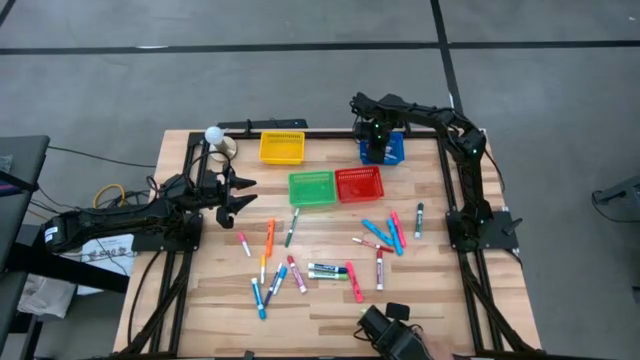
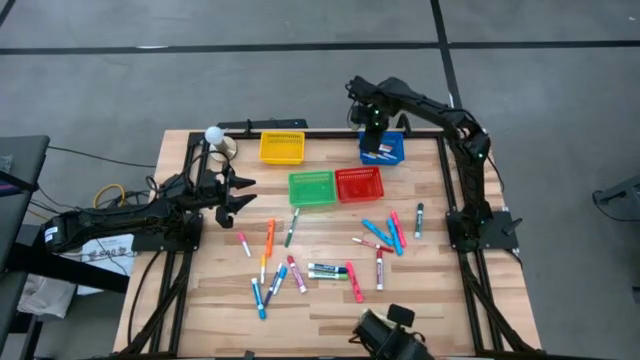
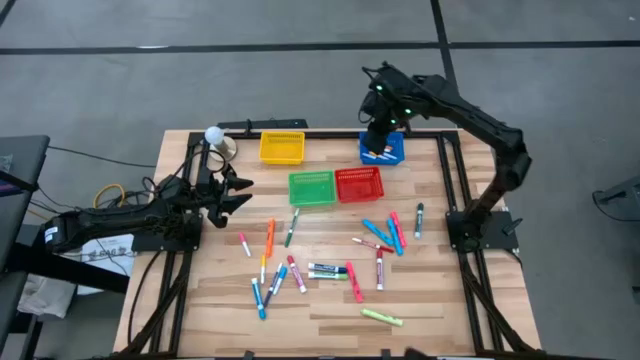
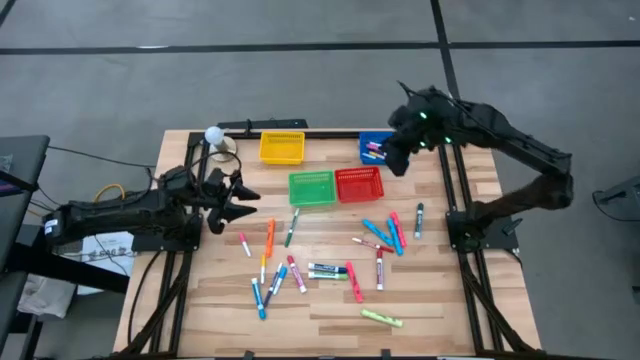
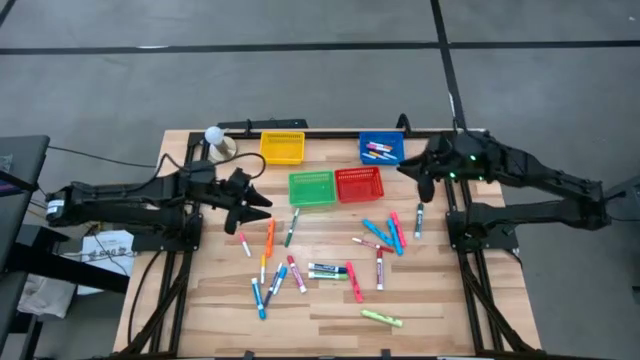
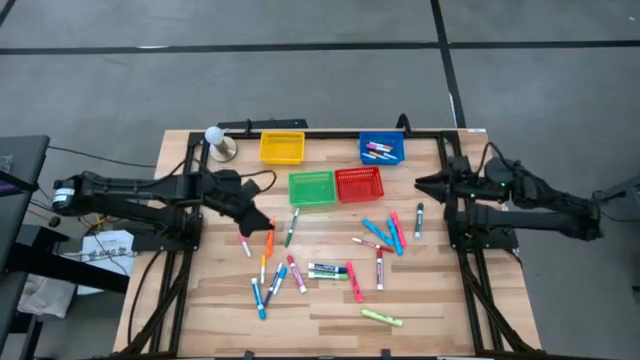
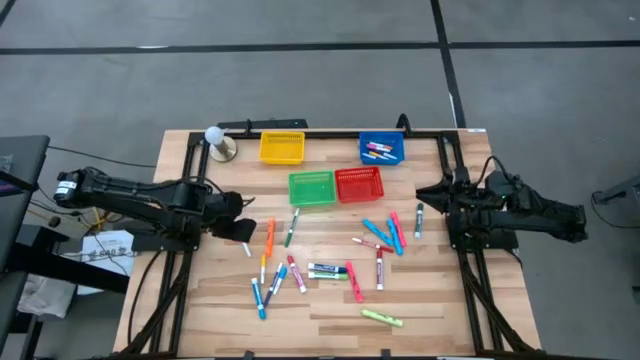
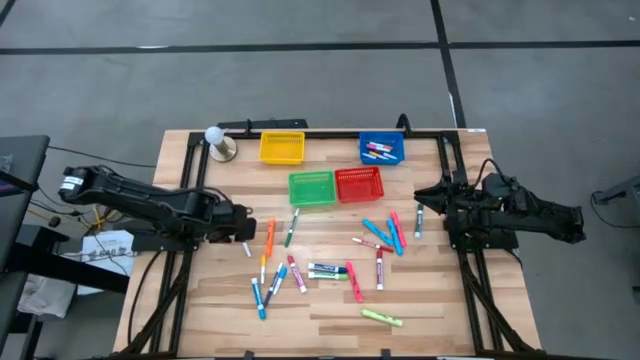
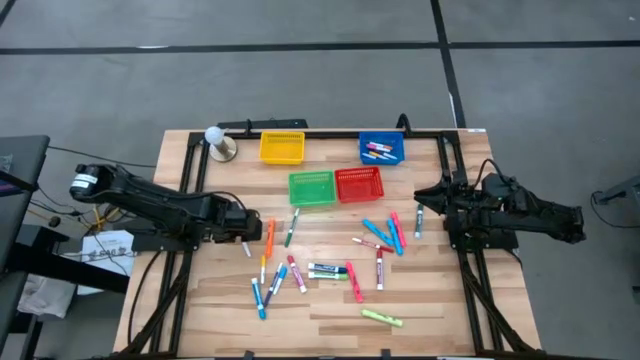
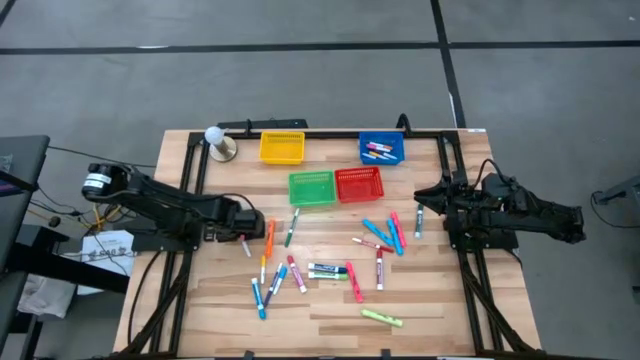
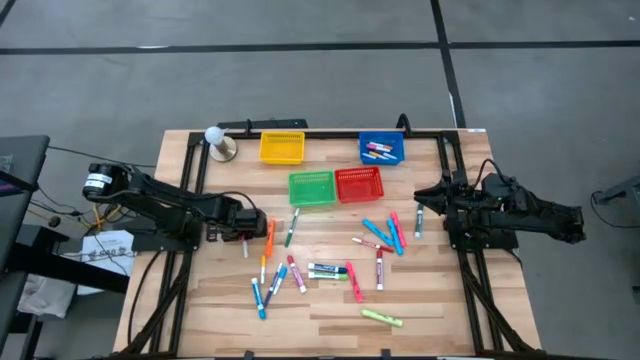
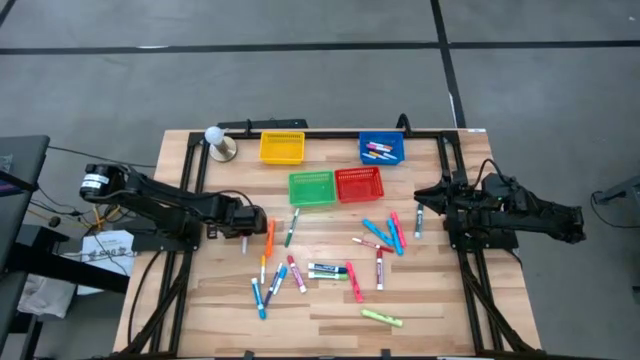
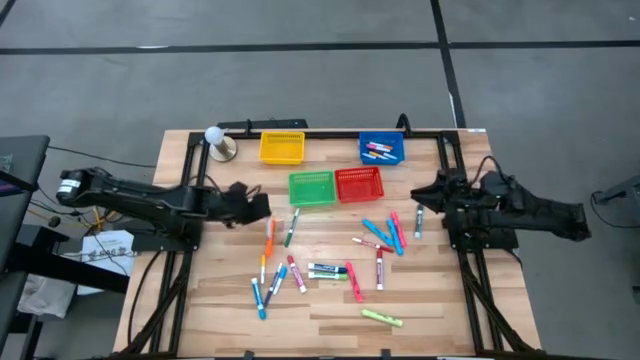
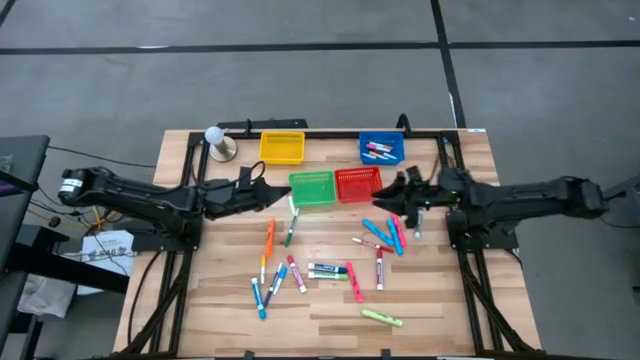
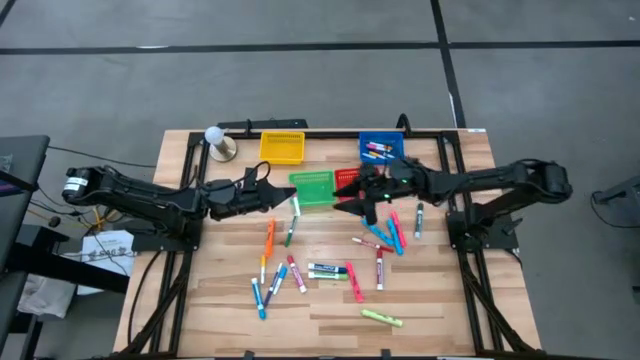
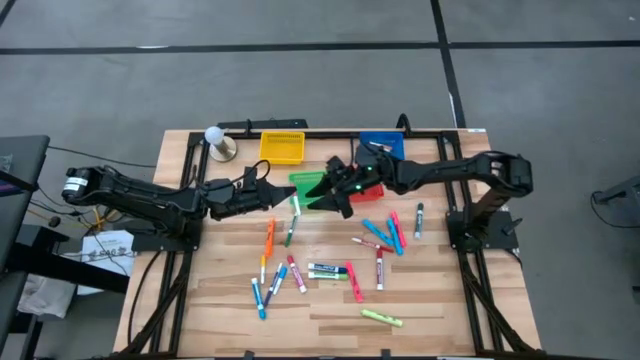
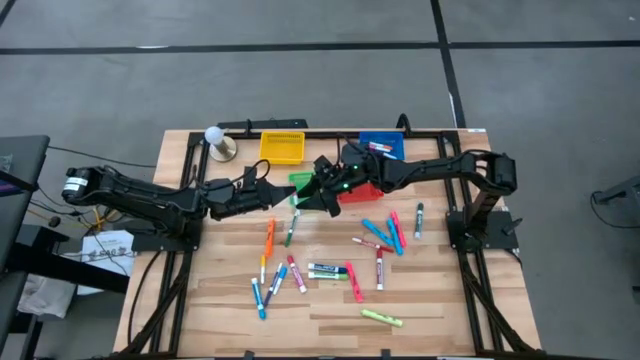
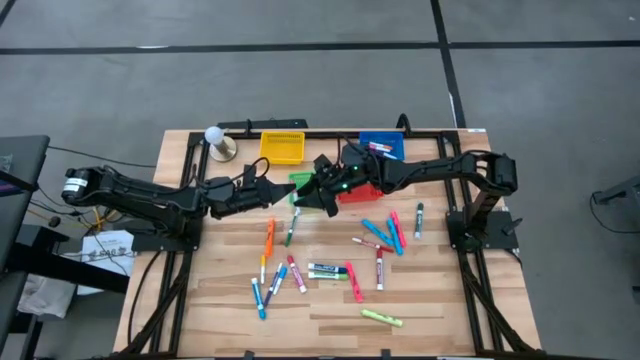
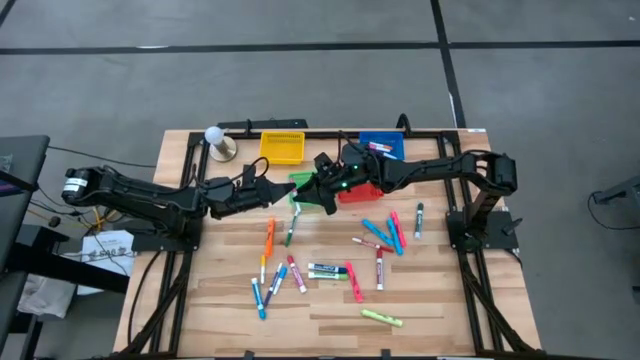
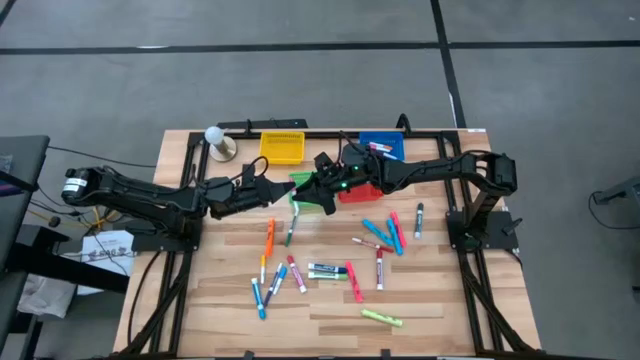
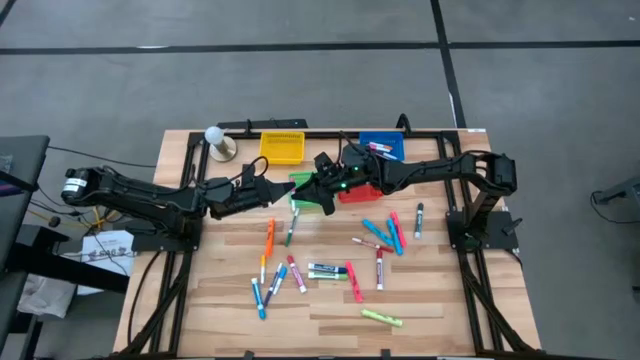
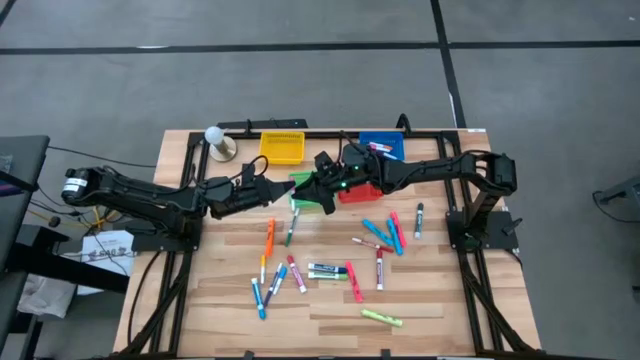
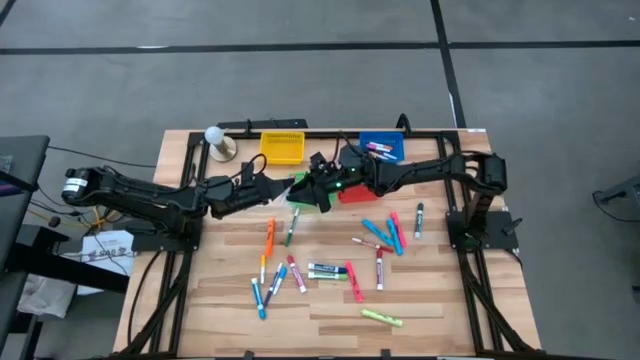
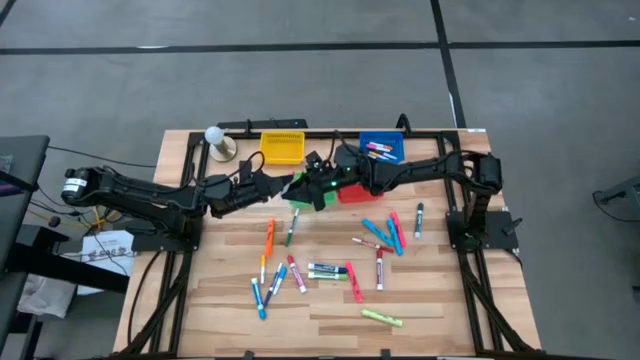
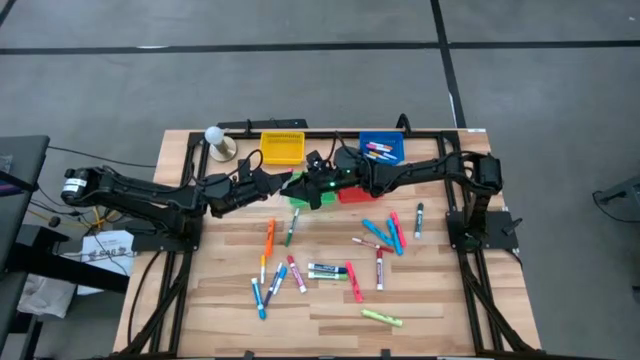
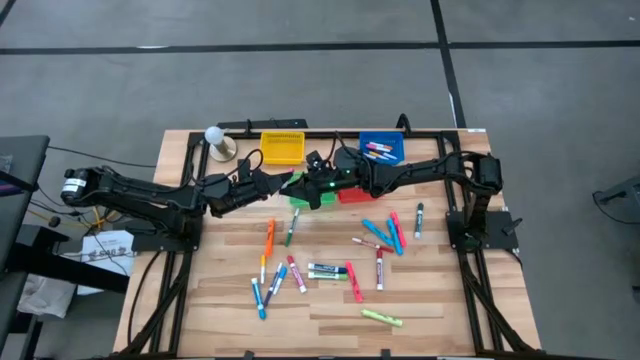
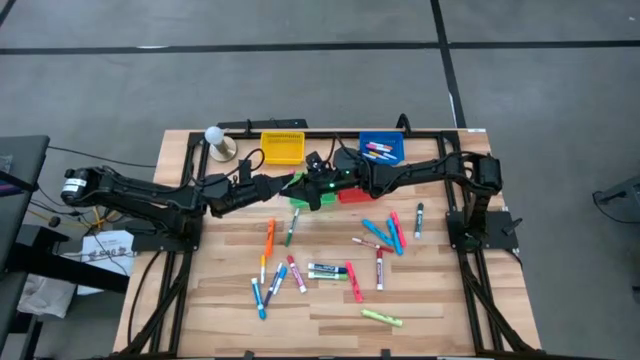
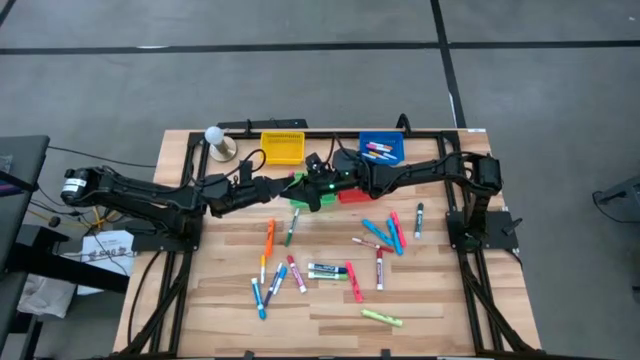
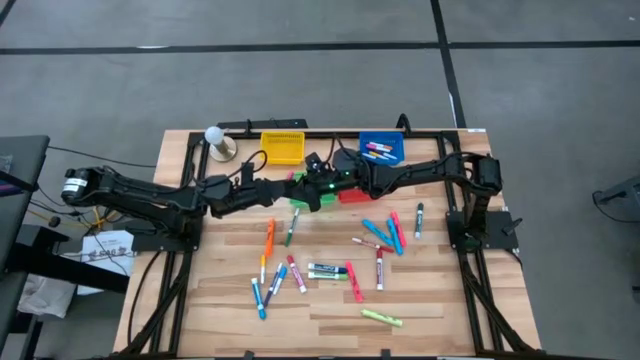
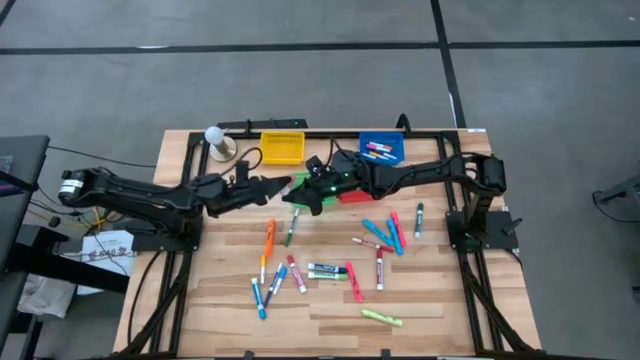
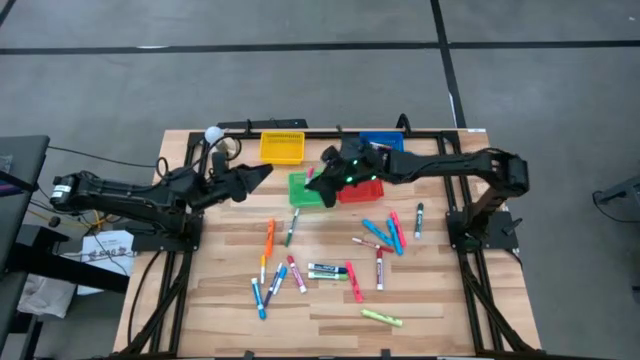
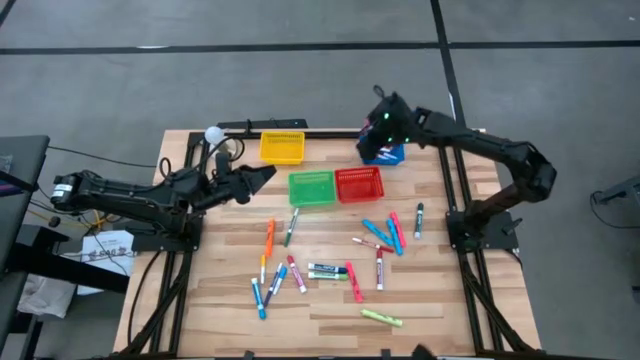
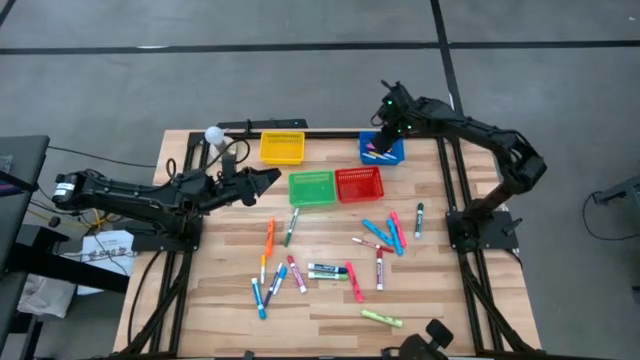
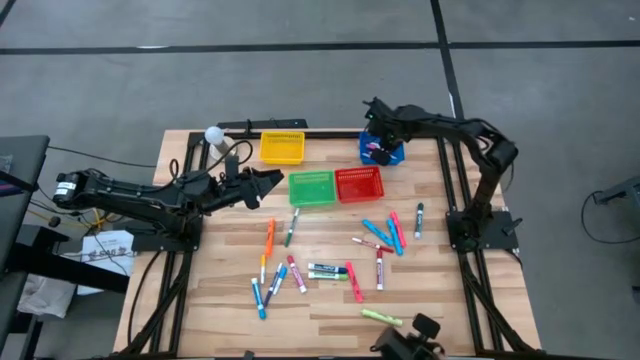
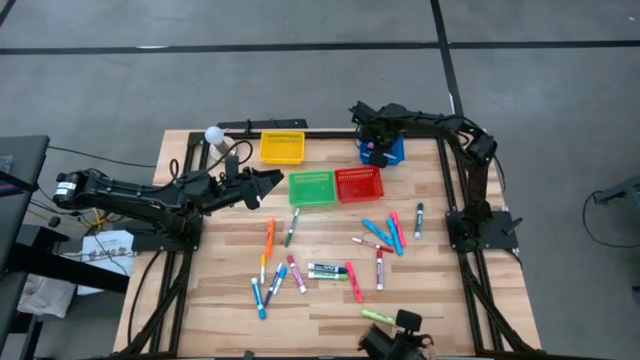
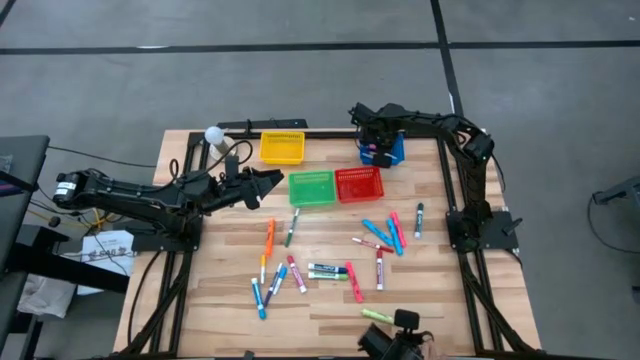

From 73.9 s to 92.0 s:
Task: Pick & Place Markers
Put the small pink highlighter pen into the blue bin

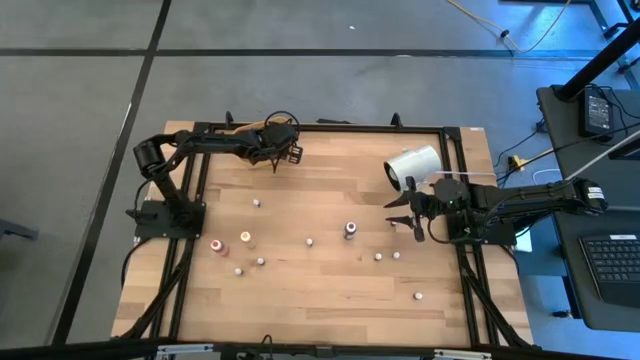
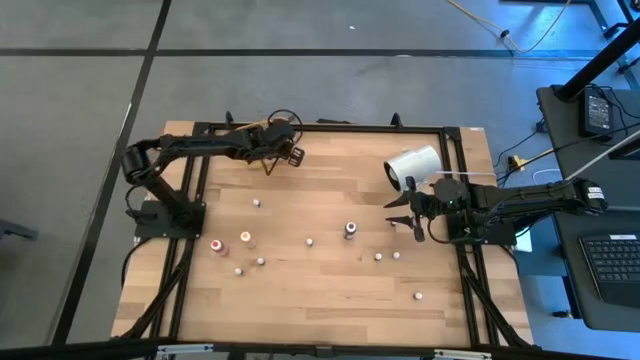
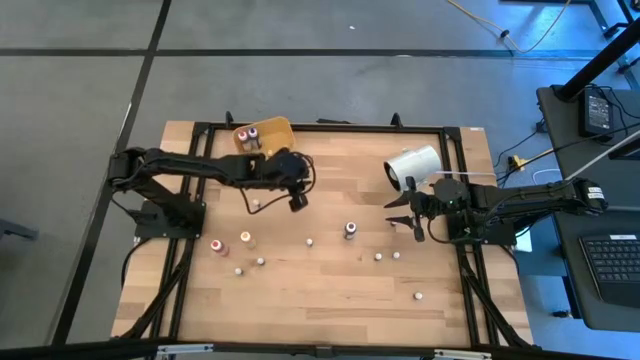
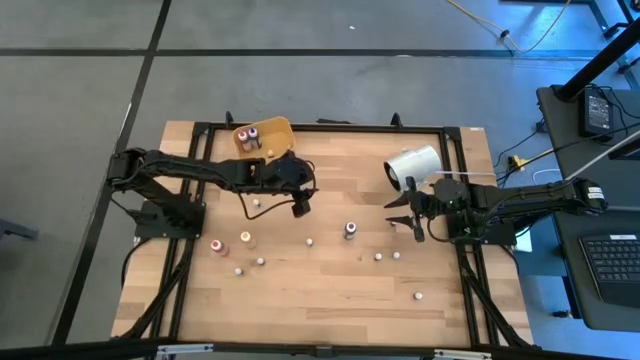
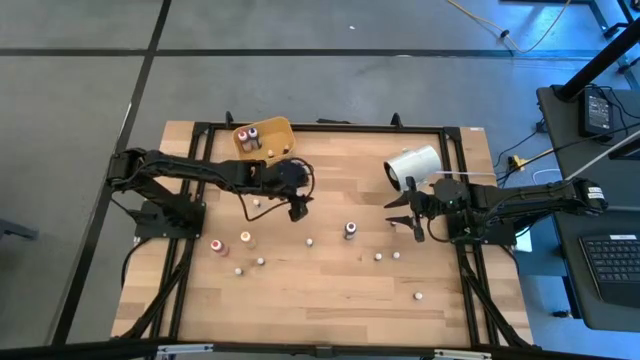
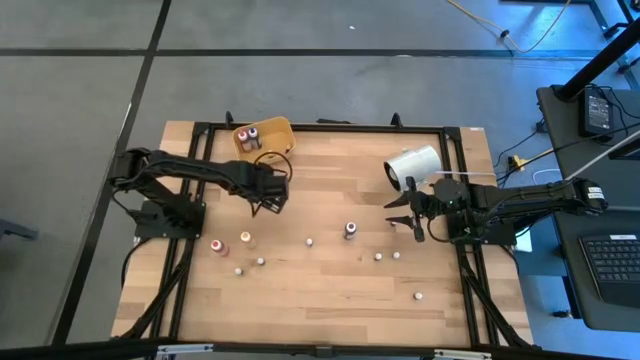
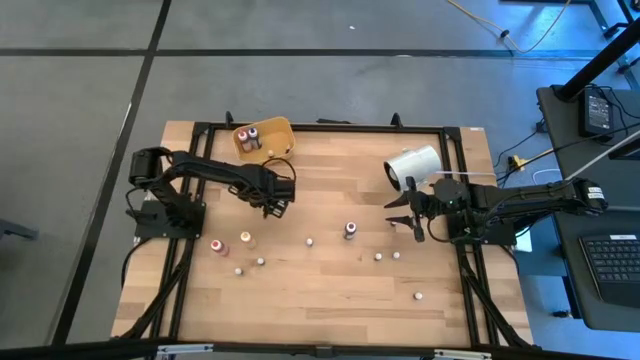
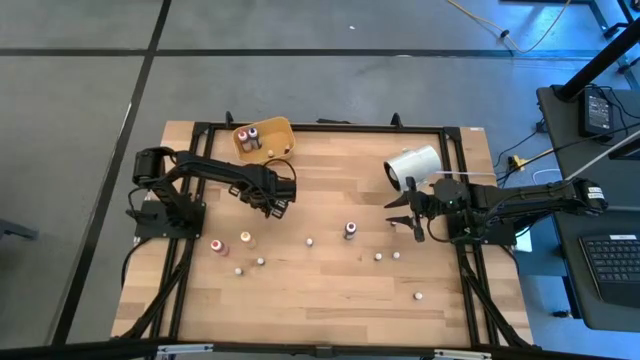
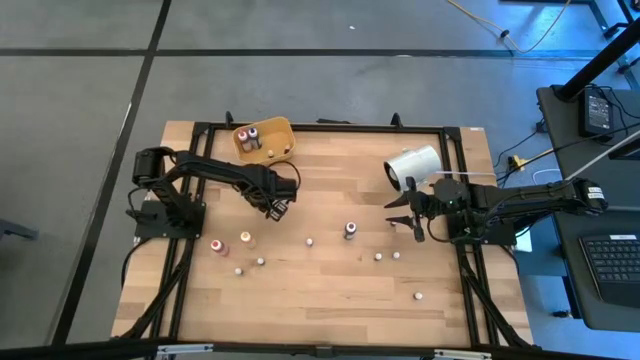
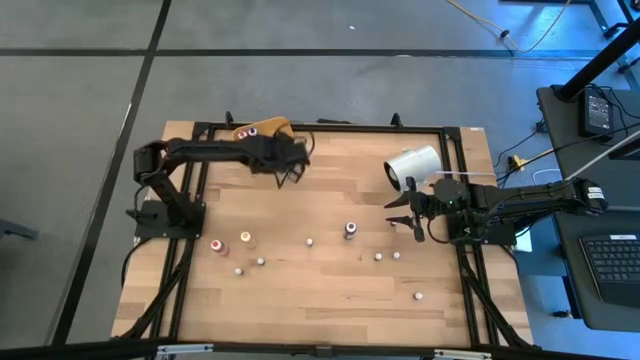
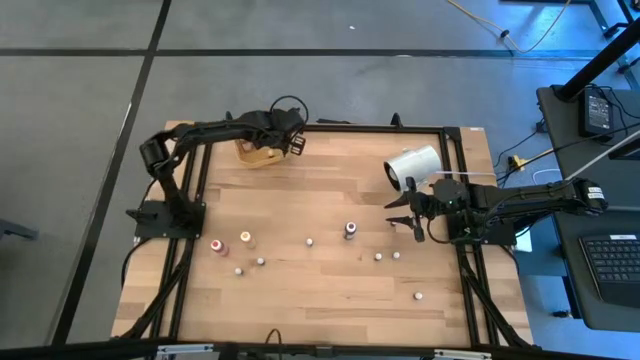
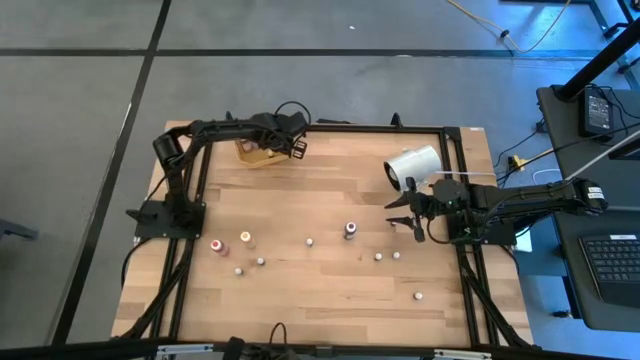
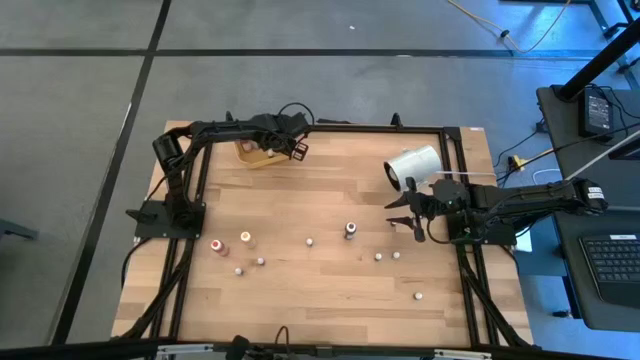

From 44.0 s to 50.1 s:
Task: Pick & Place food coloring
Put the top small black food coloring bottle into the yellow bin
